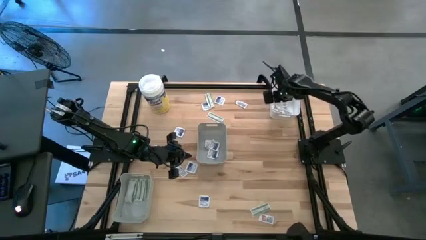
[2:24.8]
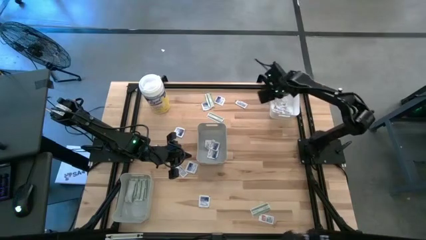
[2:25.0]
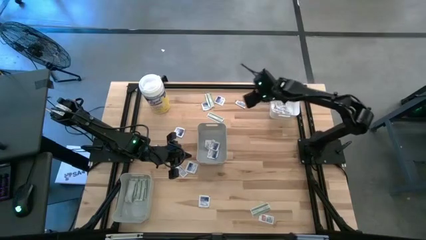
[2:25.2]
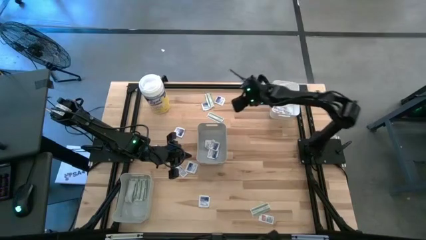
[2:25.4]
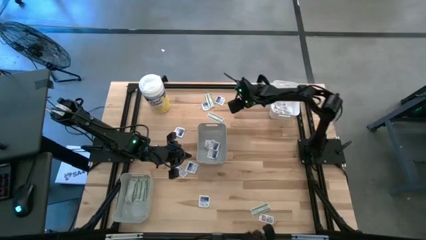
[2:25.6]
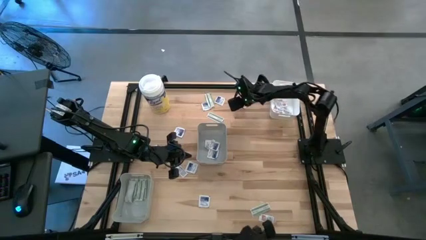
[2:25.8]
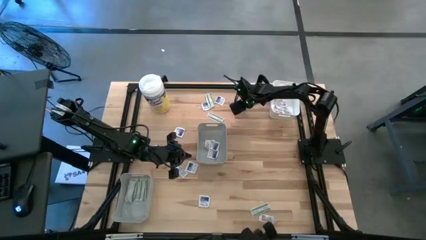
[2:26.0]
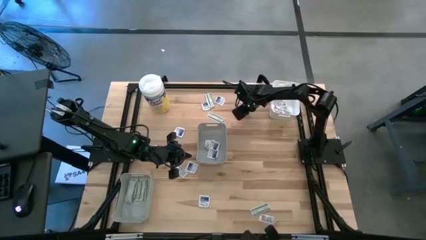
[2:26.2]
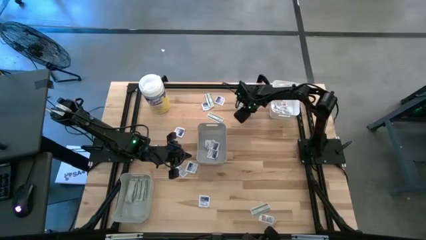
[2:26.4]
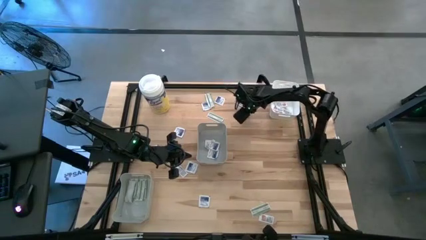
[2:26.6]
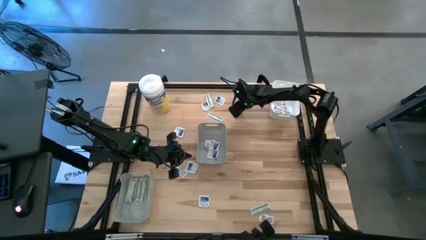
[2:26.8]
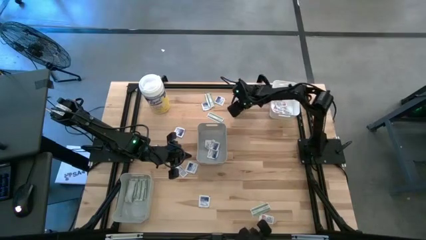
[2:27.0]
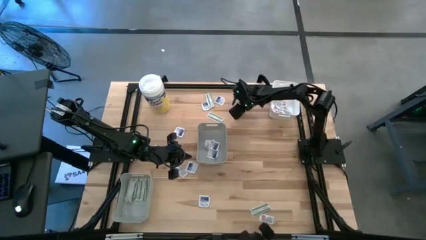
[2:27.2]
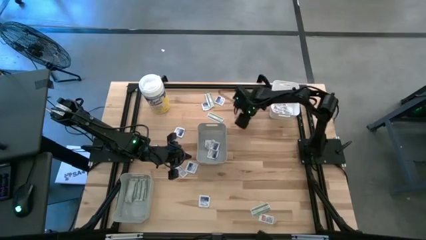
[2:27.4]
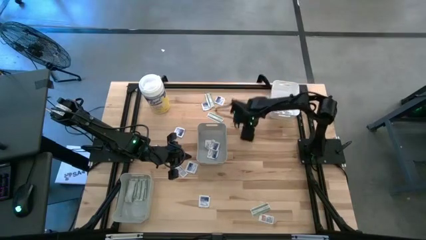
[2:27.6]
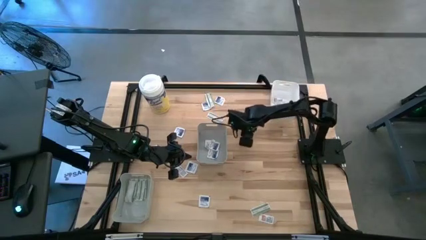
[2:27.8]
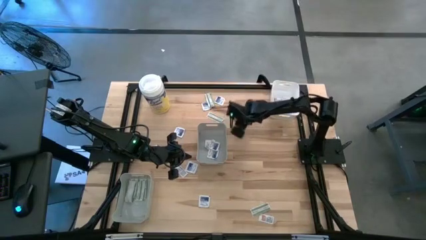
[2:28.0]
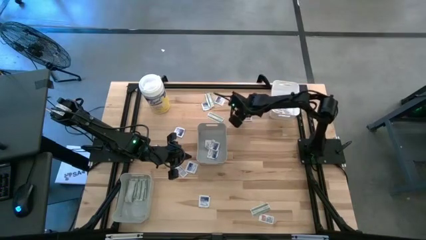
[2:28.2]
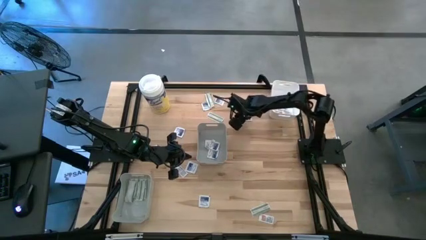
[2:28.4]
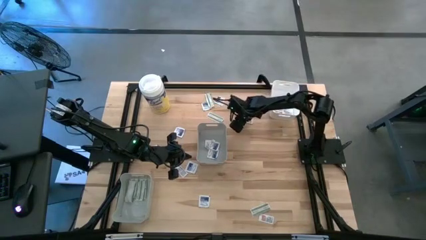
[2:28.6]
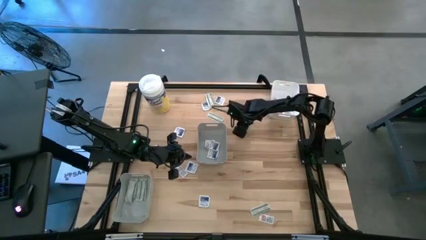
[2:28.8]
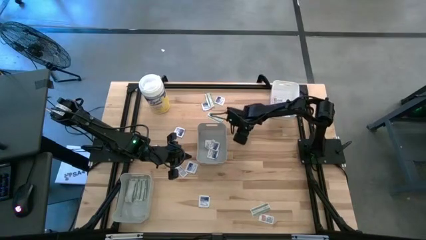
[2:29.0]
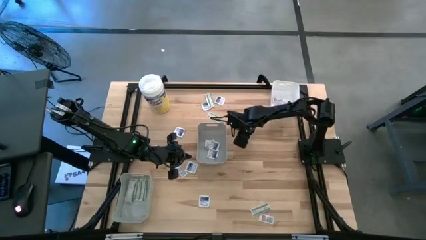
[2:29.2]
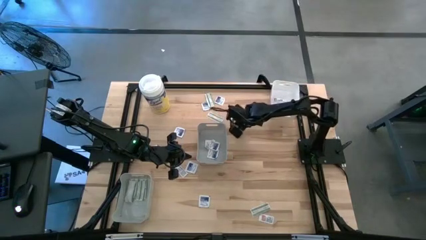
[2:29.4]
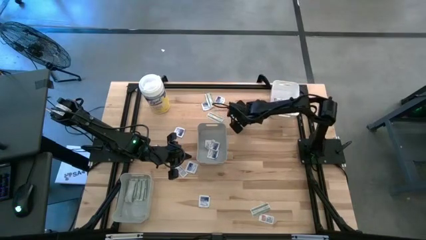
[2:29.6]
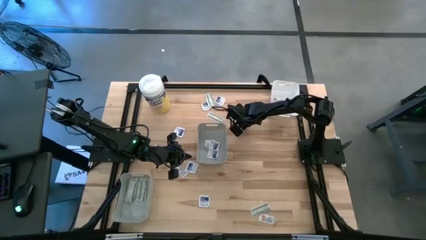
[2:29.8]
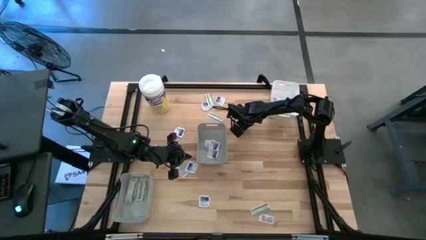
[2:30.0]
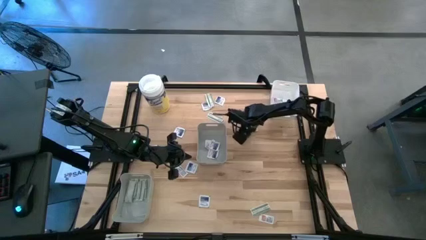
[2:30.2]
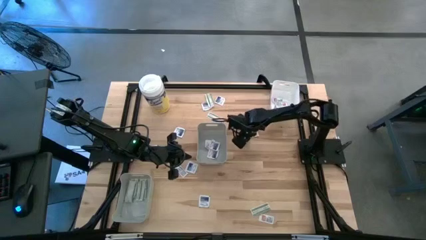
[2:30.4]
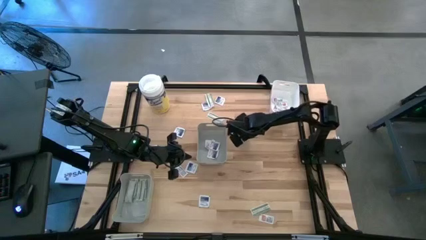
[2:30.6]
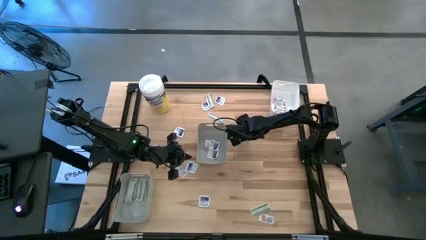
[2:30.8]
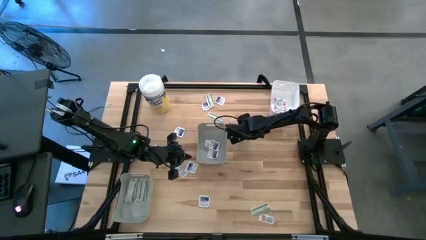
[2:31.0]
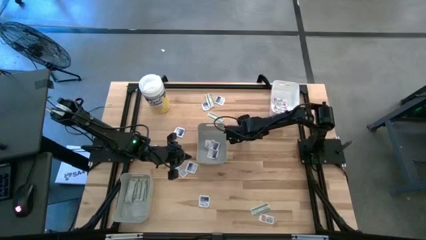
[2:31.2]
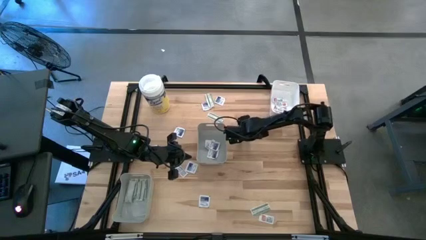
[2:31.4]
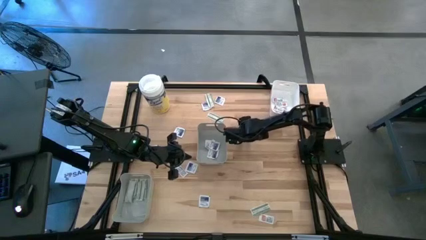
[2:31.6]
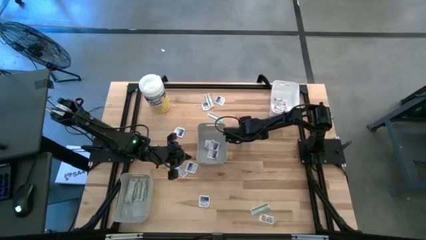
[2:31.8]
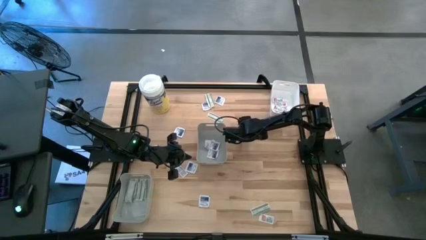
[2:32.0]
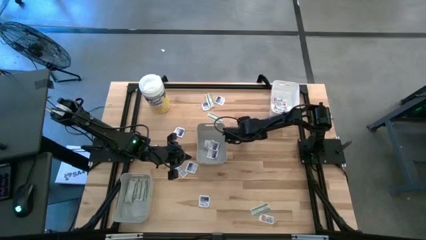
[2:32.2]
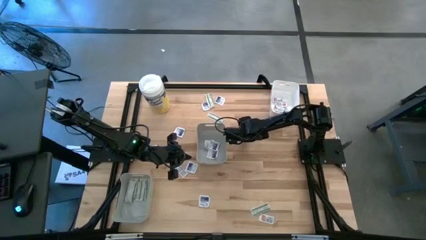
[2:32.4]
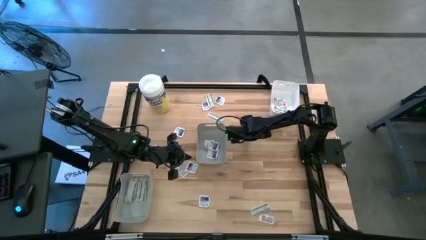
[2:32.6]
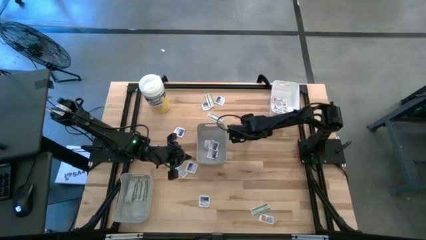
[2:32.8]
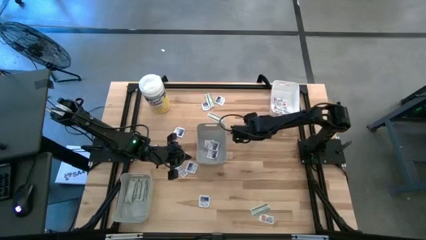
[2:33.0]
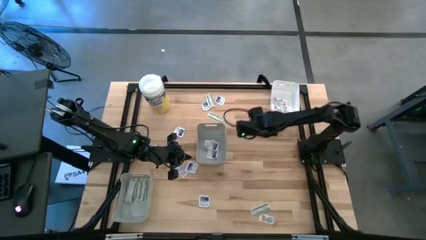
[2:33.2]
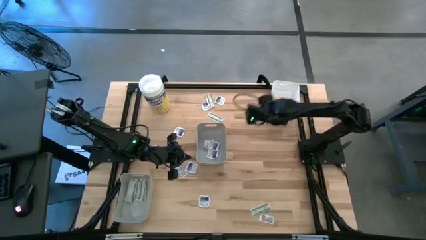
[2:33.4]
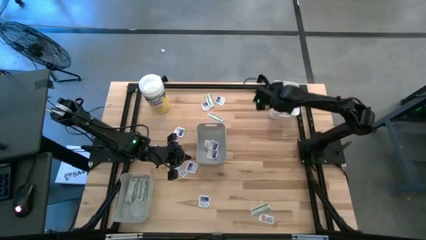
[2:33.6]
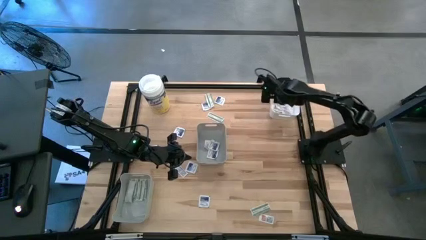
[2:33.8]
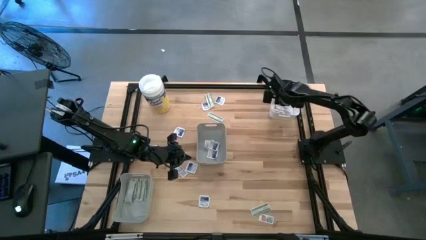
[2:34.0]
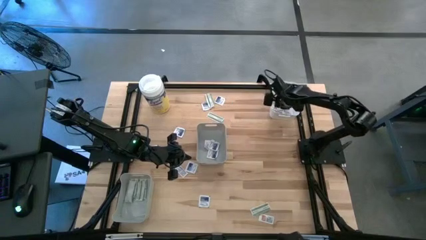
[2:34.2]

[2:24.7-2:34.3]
Task: Pick & Place First Aid Supplies
Put the orange pad into the white bin

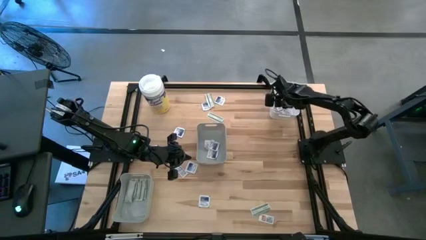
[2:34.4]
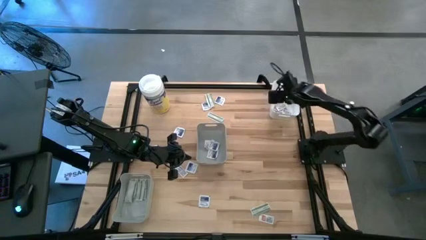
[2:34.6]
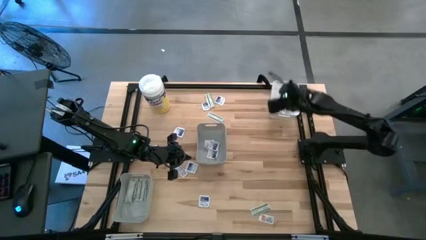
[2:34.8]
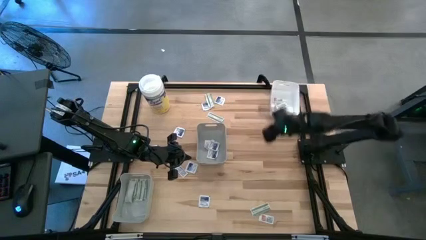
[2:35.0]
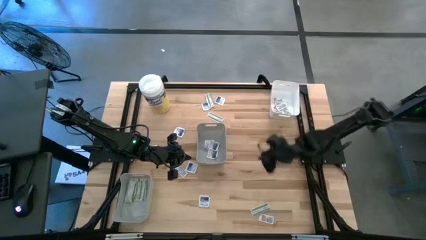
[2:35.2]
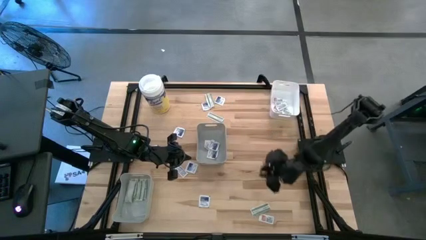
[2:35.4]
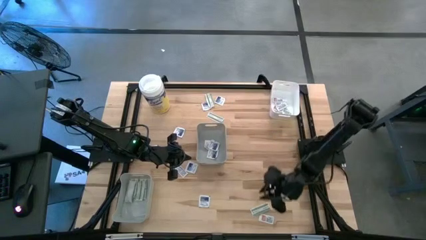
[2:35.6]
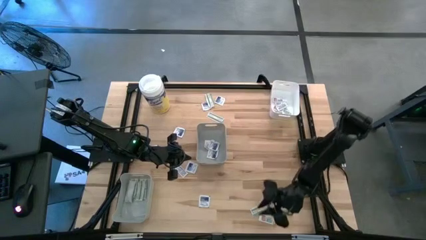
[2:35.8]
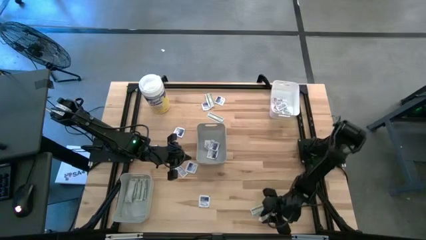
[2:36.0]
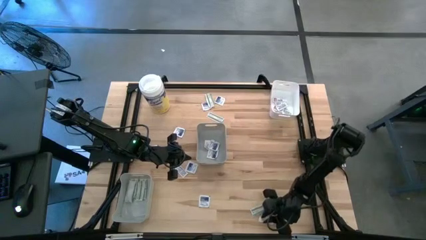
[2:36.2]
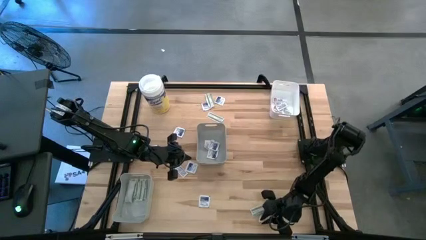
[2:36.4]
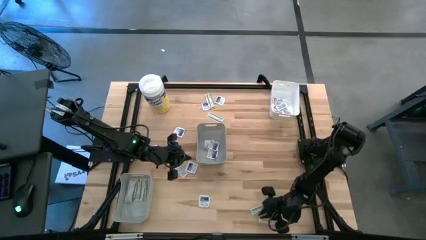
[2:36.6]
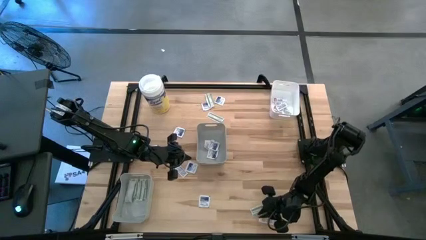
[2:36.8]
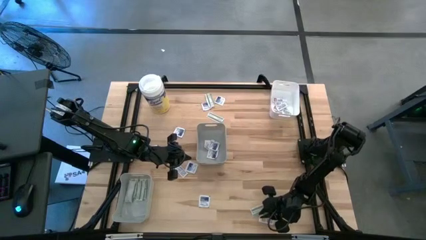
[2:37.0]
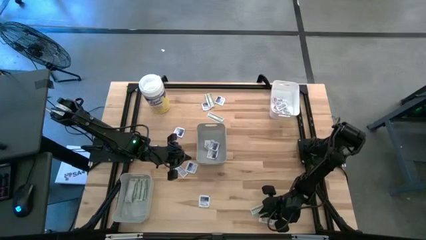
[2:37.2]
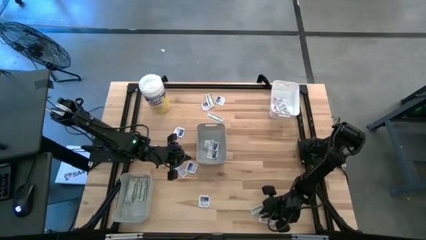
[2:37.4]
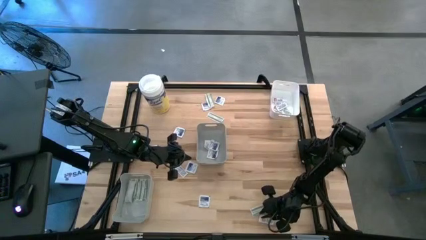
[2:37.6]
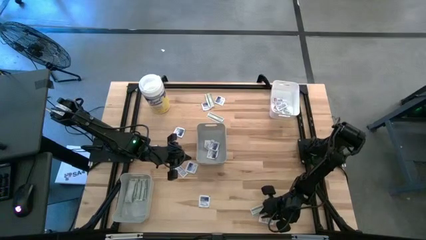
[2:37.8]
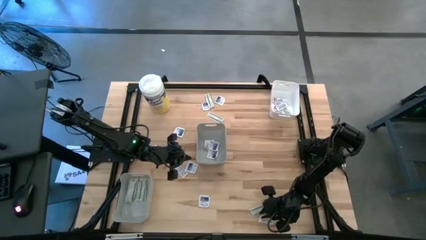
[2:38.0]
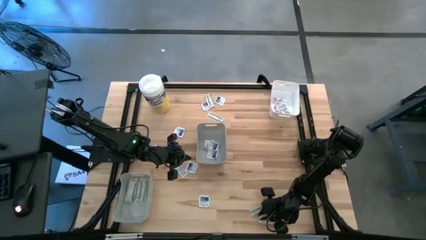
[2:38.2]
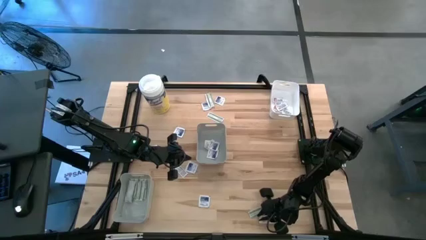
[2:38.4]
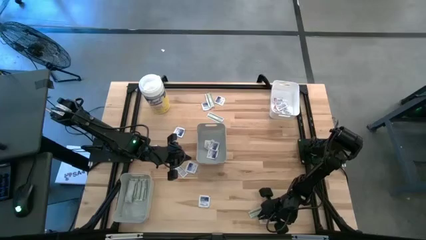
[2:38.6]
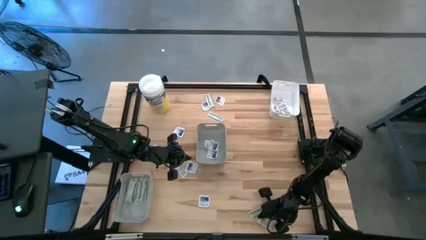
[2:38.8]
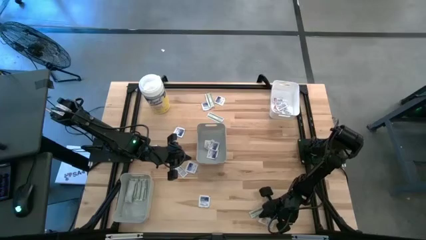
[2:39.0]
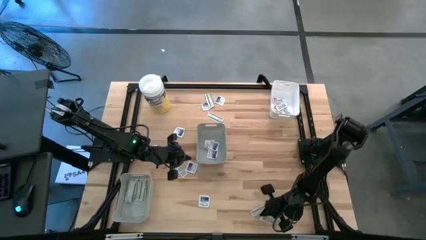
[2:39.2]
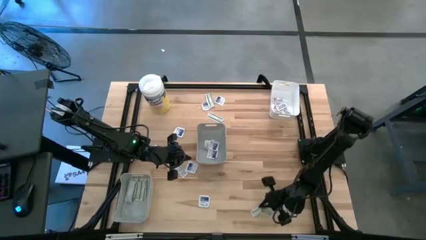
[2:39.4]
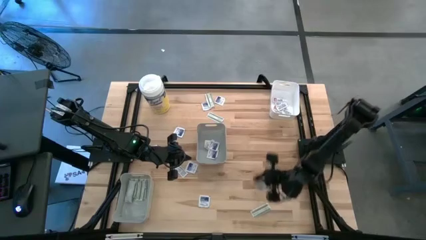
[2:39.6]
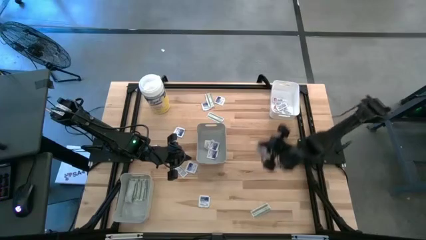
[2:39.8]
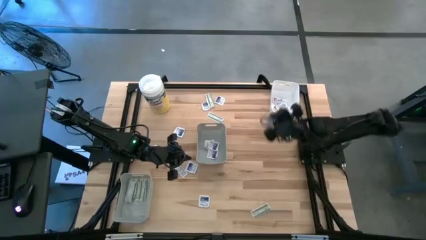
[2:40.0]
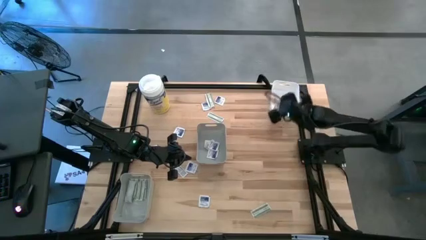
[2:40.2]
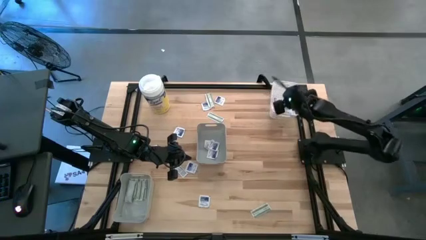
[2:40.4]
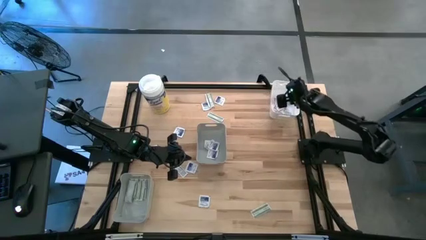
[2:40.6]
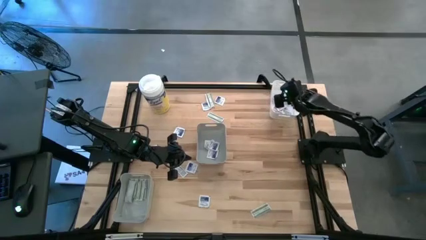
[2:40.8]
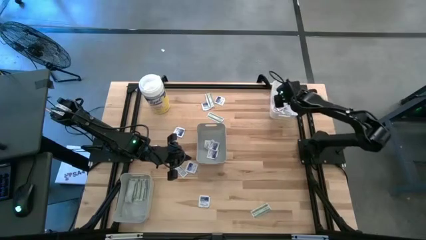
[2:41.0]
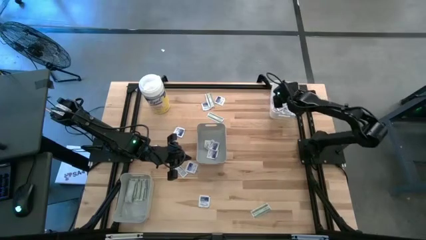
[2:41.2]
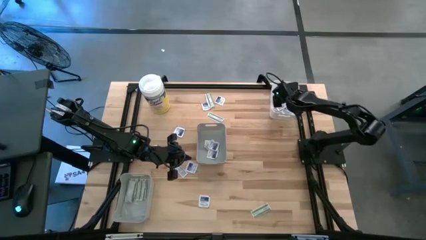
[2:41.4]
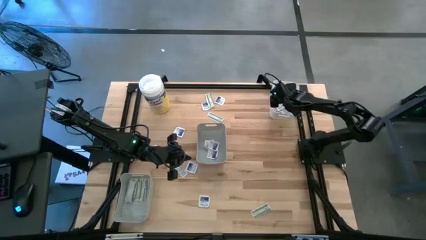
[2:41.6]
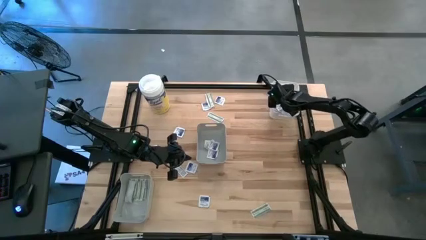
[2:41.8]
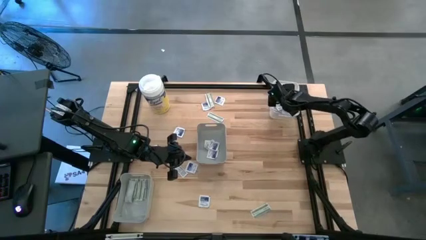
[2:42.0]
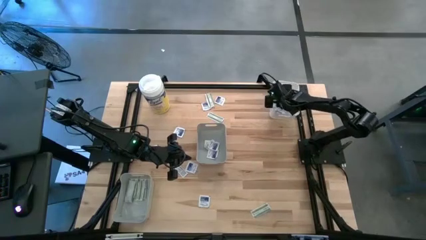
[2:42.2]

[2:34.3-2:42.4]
Put the orange pad into the white bin
